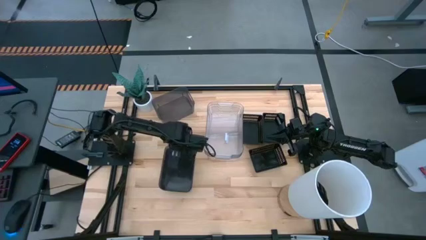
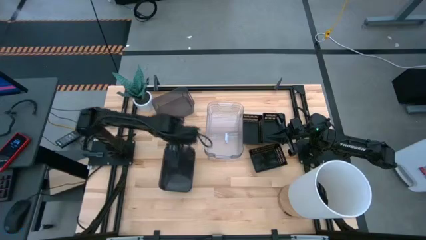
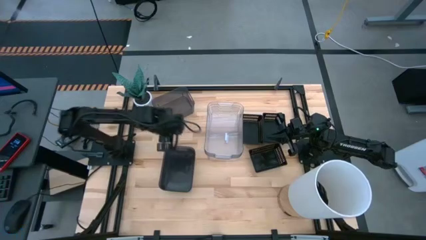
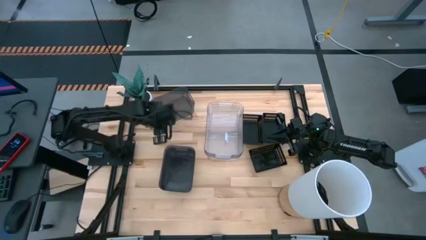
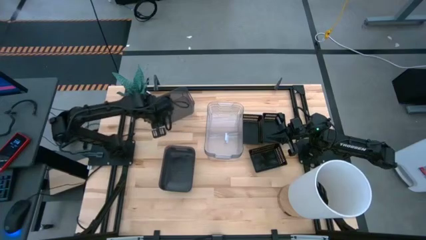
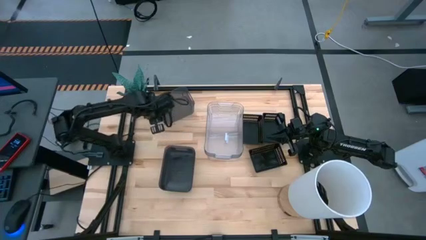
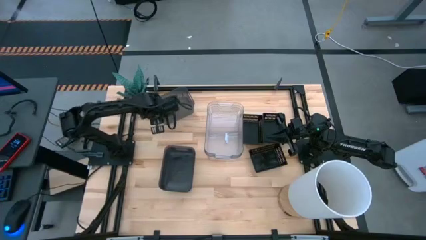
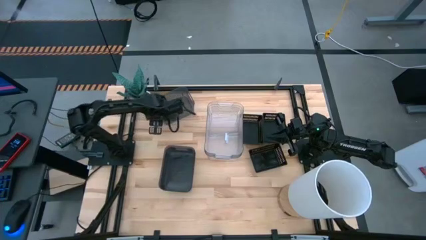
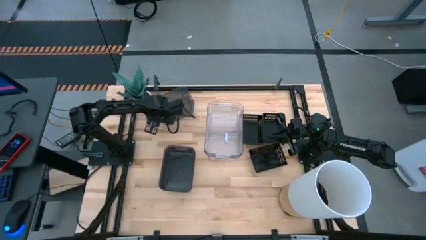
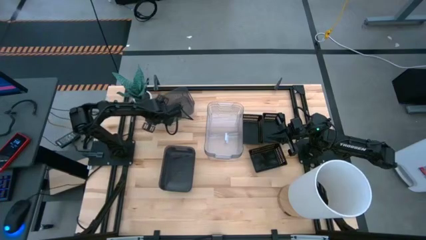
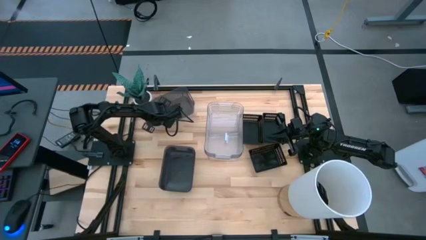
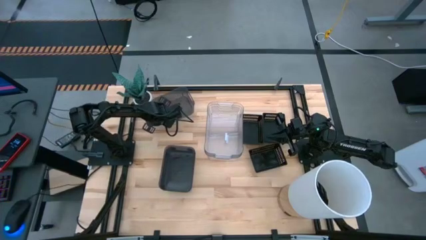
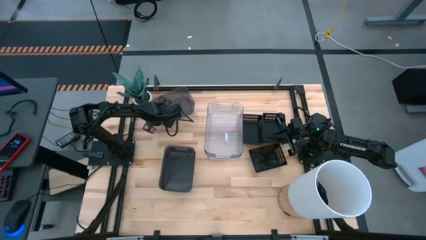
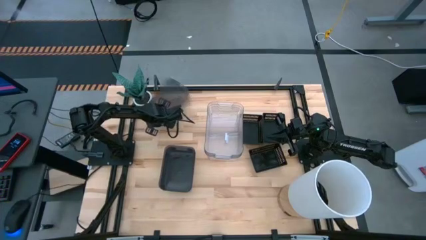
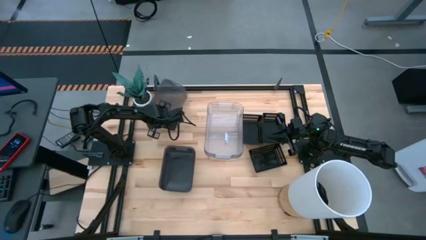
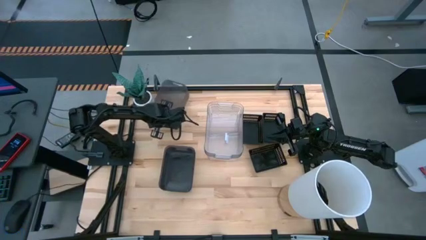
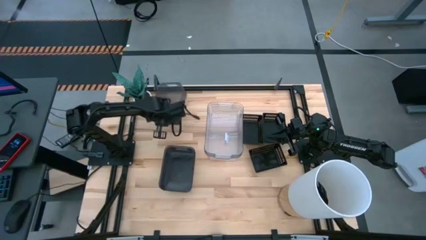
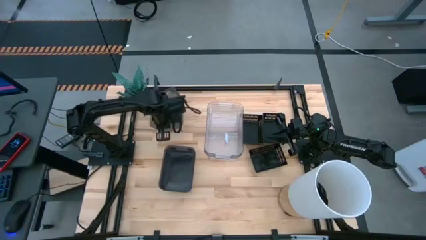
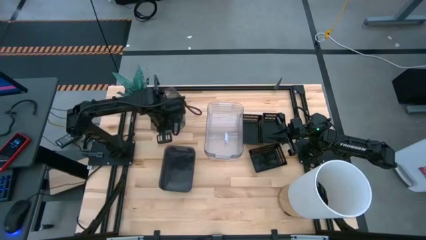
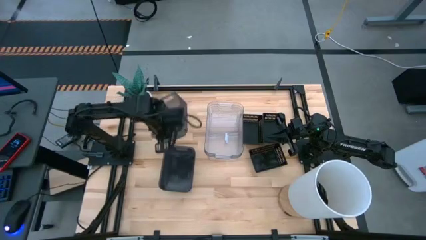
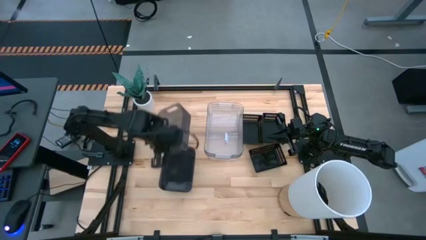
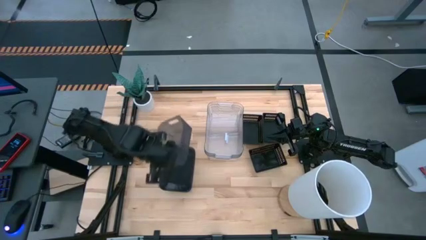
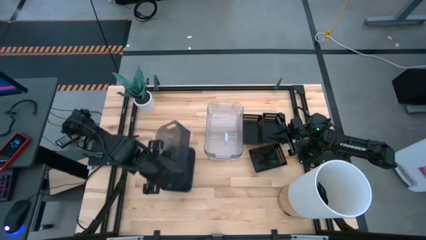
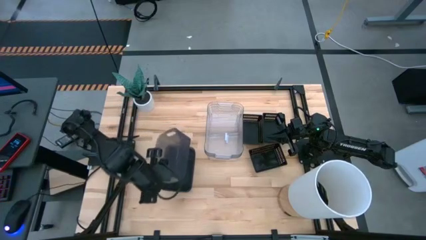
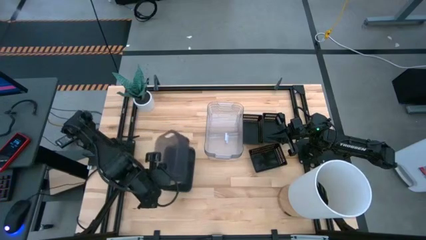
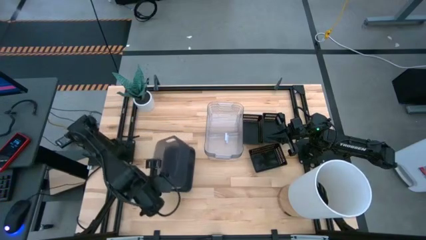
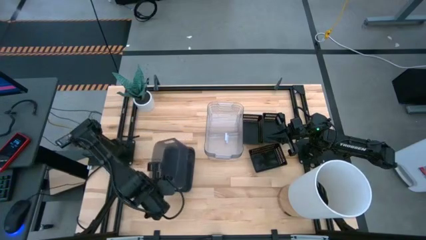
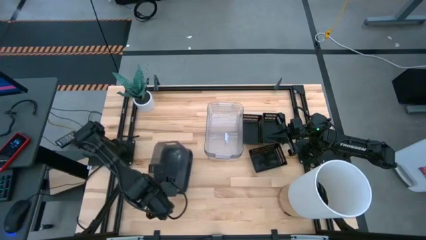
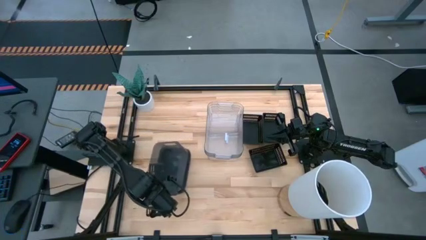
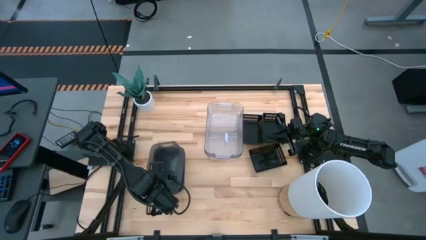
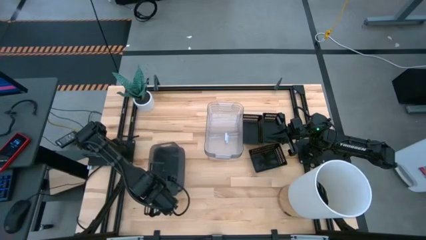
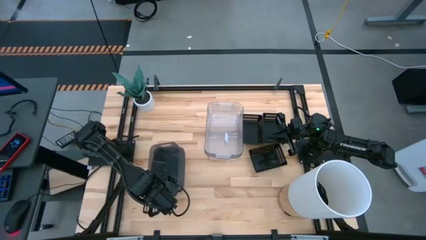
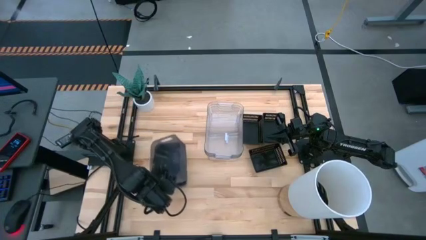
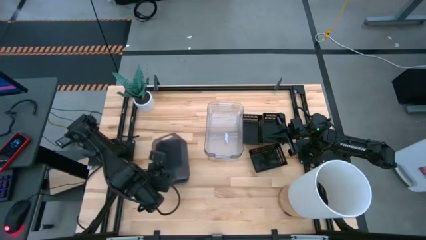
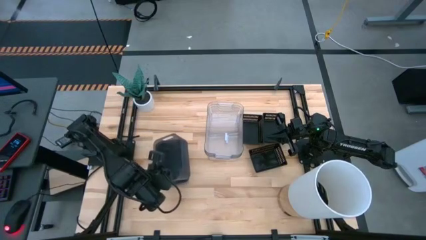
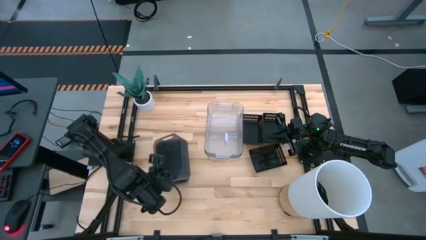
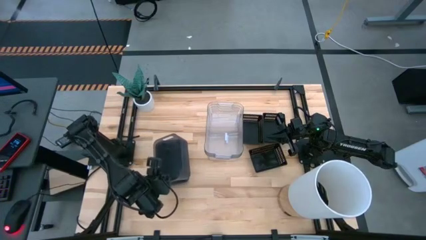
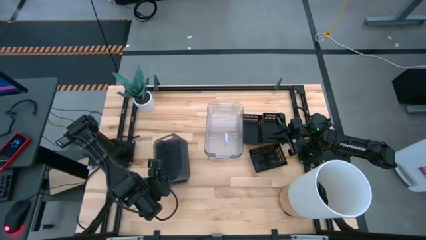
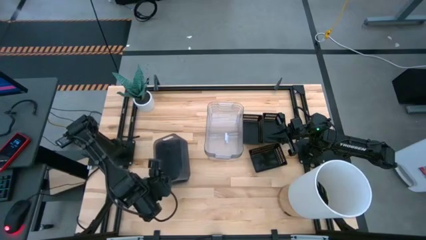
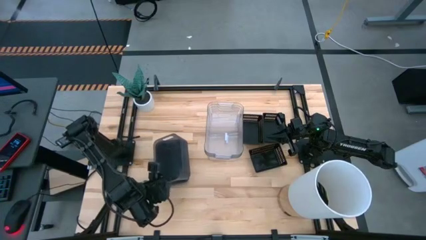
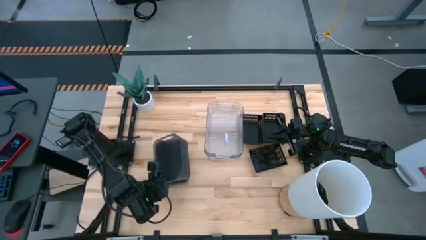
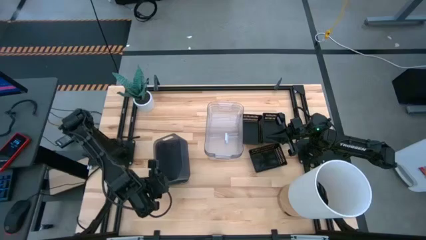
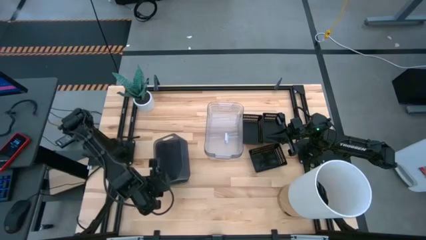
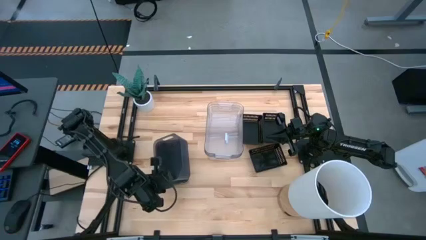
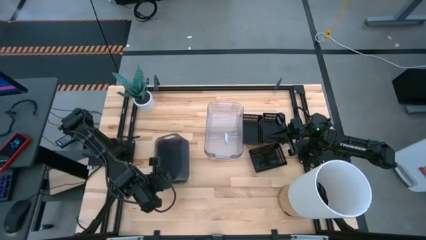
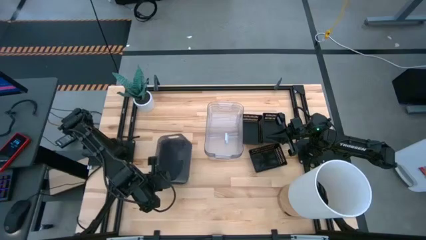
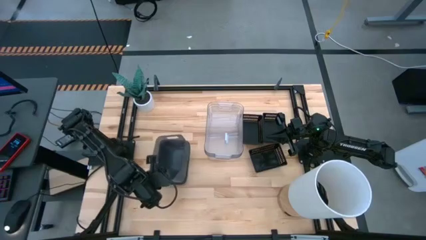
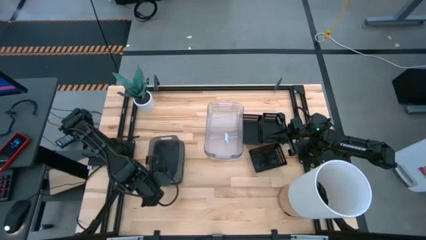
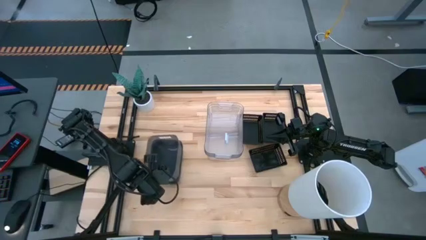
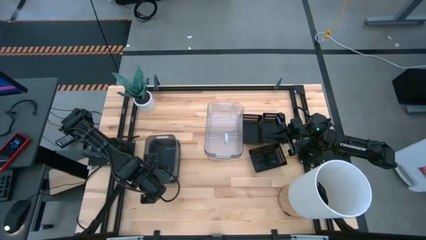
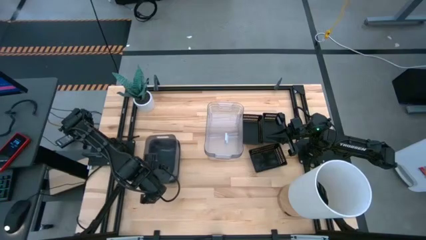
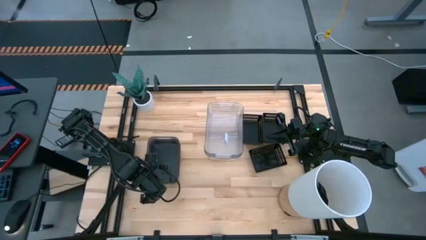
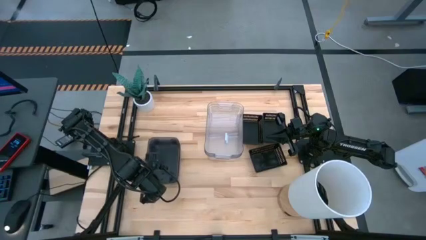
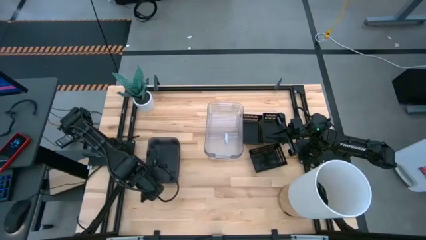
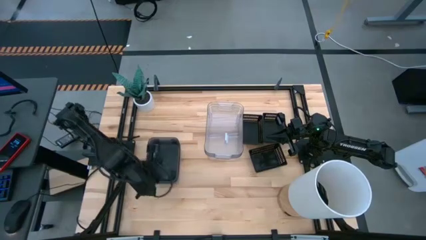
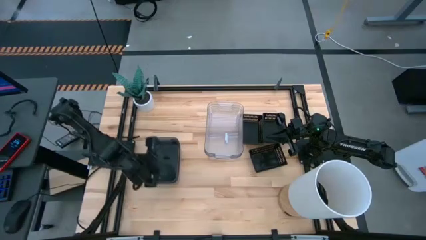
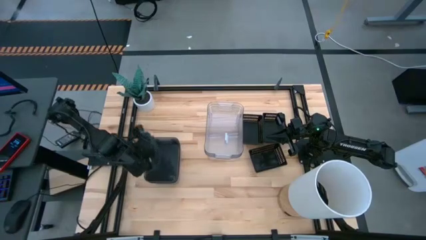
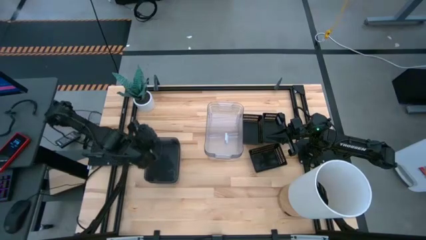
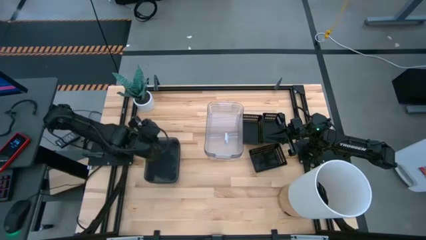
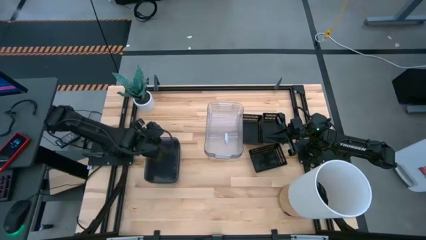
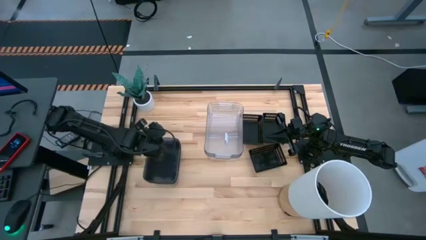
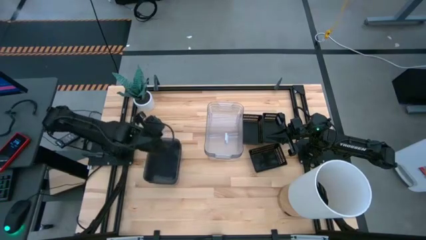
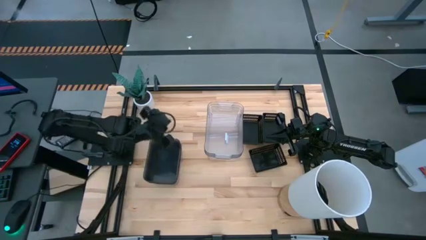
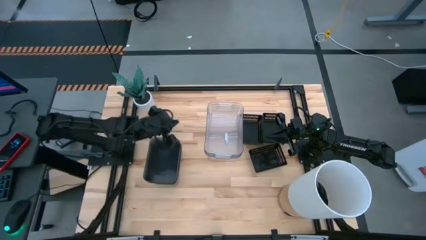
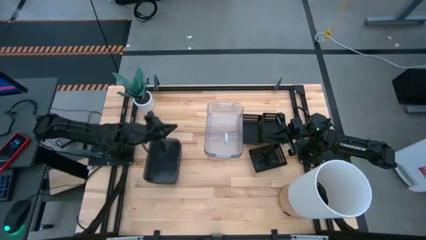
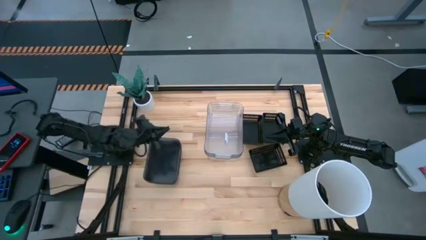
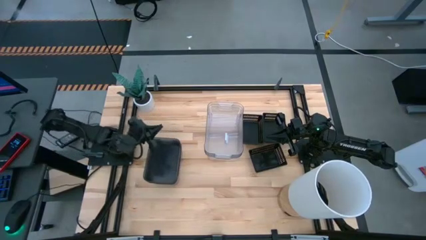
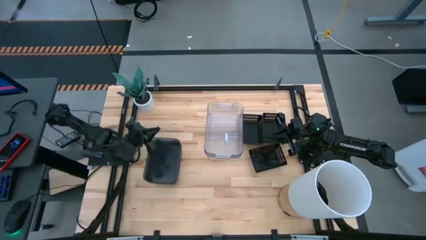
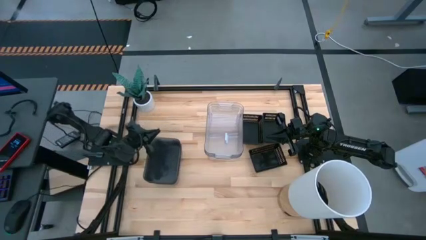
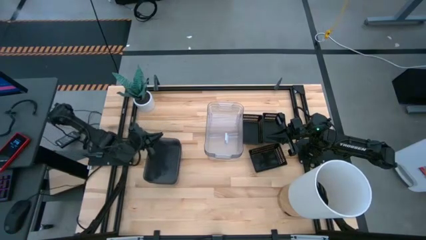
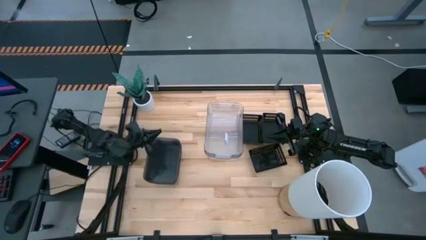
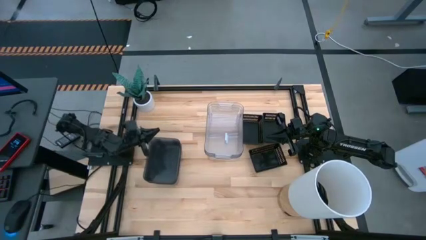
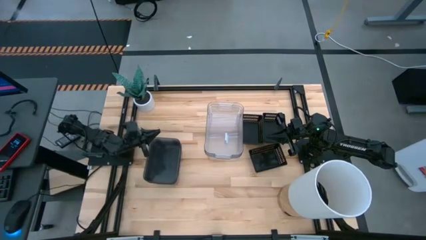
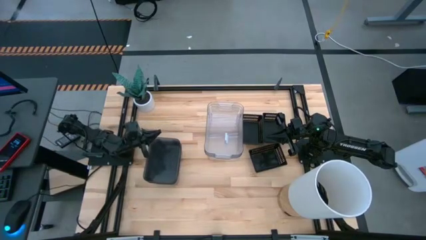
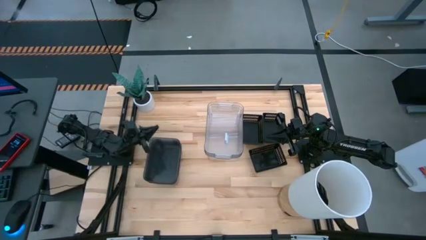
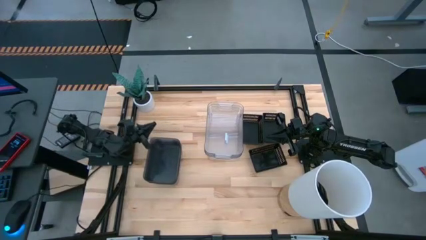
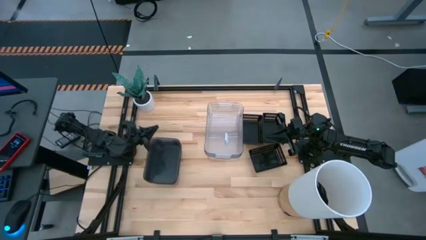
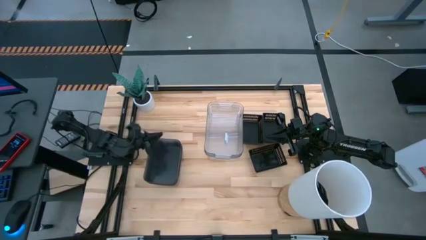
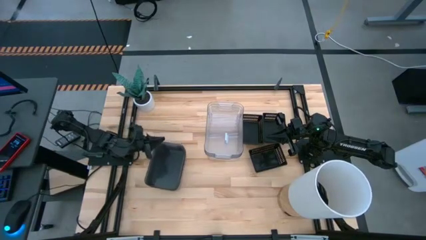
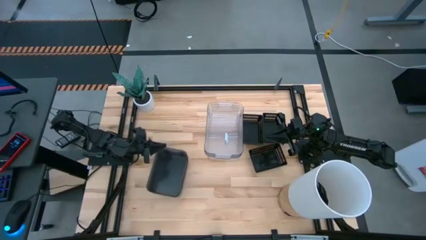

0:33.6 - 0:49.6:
Stack the black transparent bin on the black transparent bin
